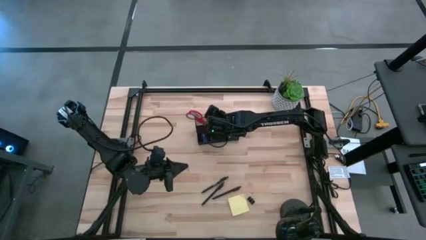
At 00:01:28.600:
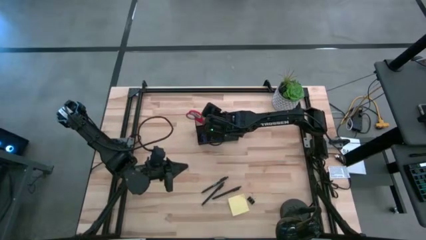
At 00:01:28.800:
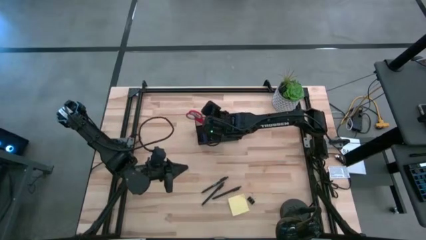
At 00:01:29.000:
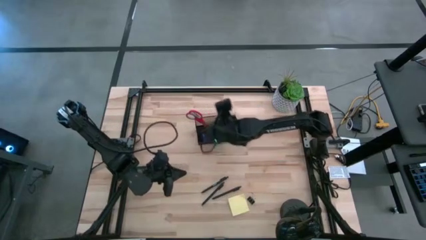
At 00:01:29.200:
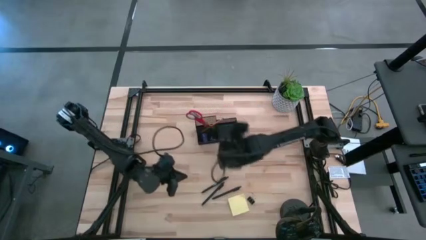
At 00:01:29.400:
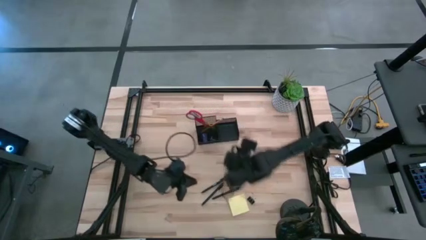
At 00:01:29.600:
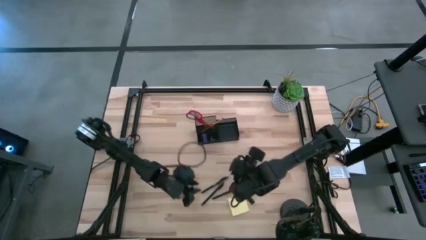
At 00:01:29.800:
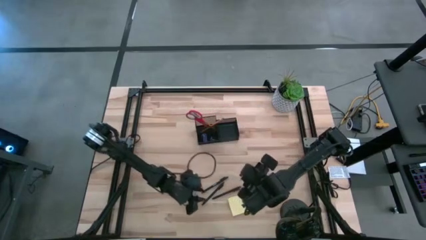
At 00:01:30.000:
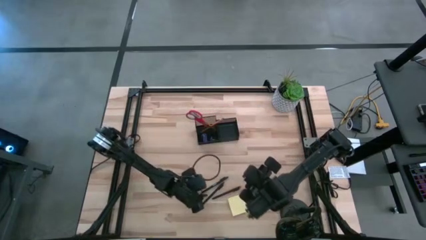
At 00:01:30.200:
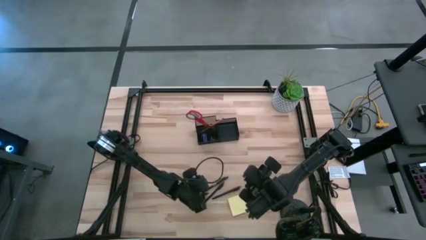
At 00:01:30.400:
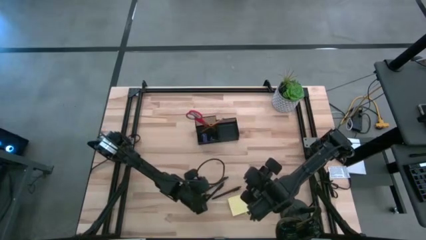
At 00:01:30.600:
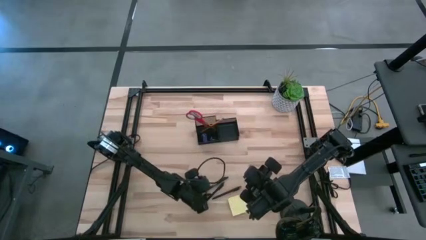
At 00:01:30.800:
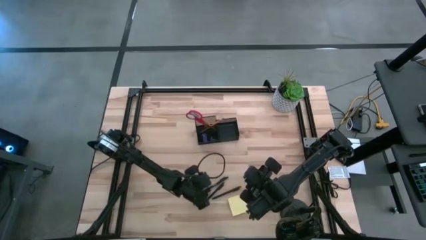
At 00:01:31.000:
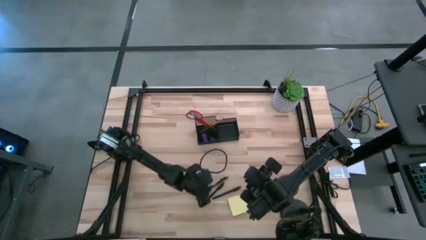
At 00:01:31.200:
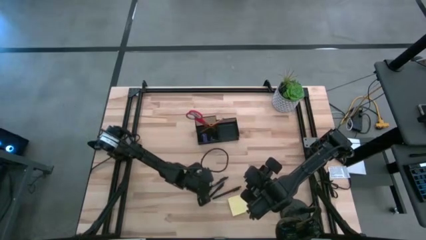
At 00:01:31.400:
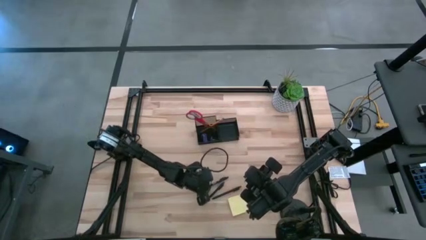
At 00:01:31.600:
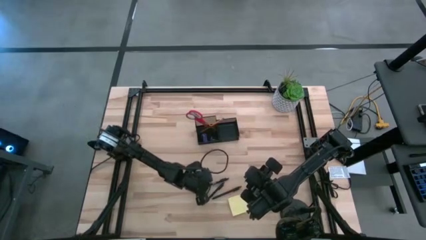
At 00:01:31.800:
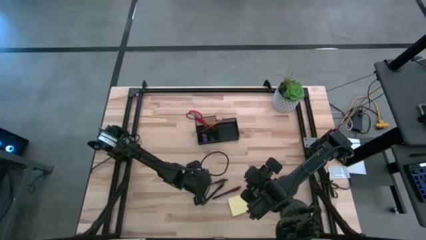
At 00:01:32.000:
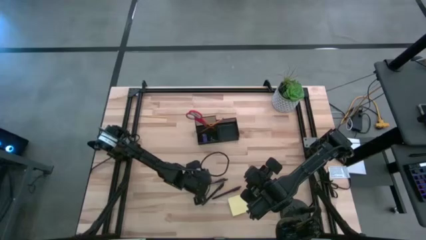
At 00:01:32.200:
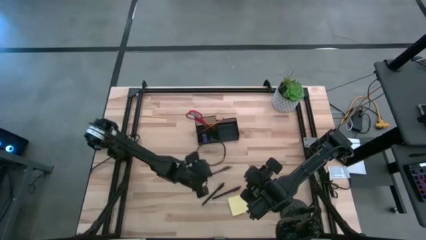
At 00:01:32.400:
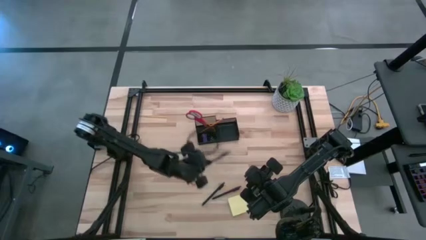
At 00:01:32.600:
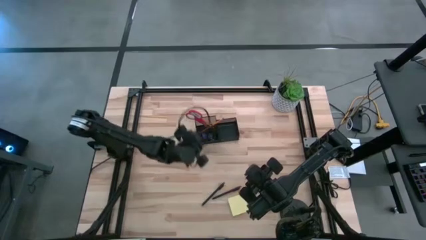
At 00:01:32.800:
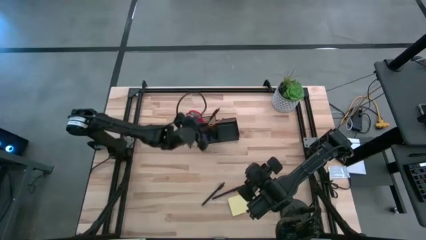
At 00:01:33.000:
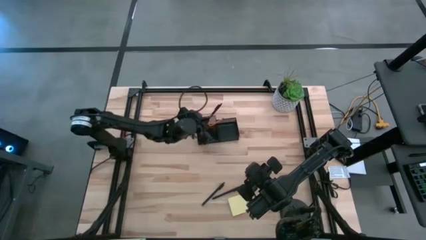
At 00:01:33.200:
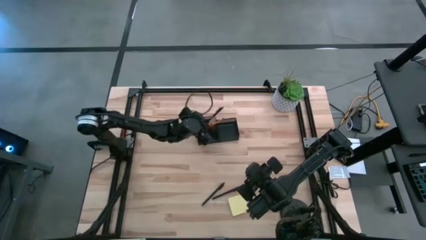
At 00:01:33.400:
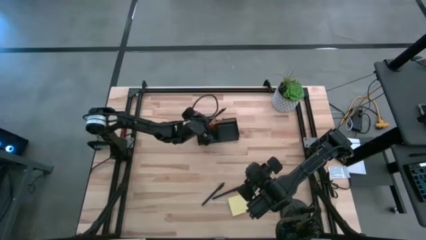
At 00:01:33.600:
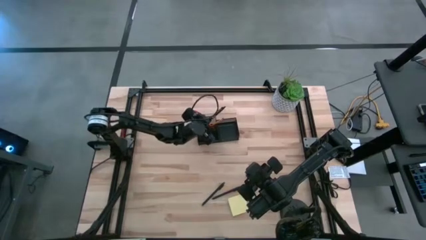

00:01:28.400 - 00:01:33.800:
Task: Pick and place office supplies into organizer
Put the top pen into the top left section of the desk organizer

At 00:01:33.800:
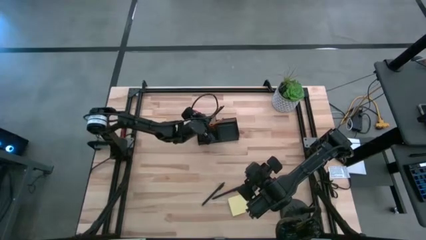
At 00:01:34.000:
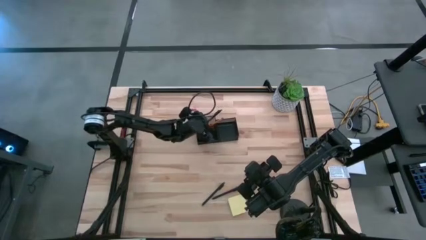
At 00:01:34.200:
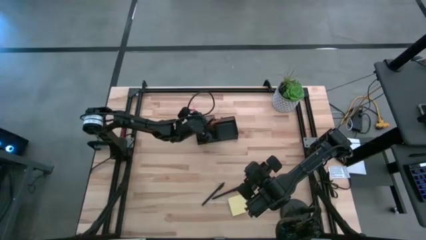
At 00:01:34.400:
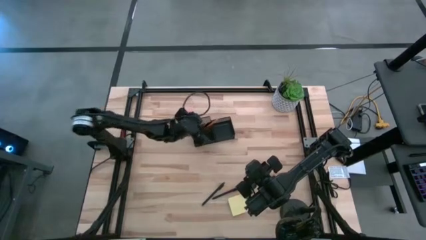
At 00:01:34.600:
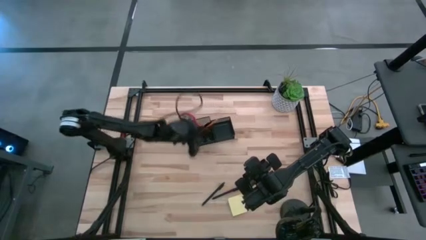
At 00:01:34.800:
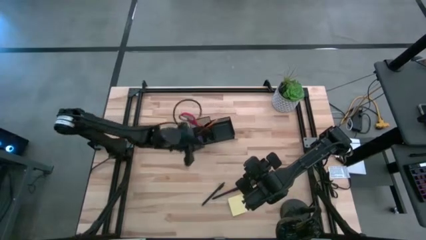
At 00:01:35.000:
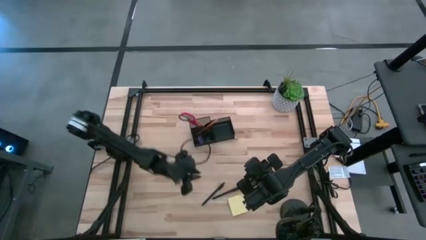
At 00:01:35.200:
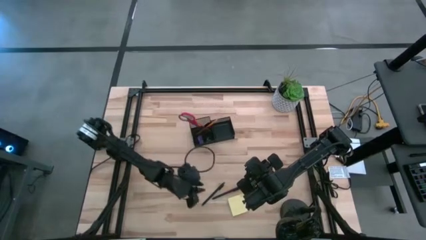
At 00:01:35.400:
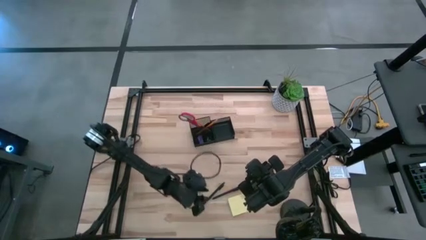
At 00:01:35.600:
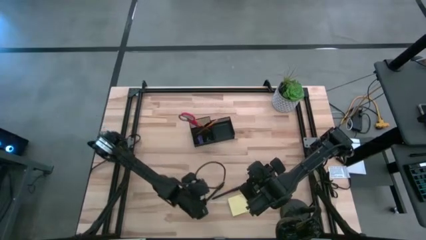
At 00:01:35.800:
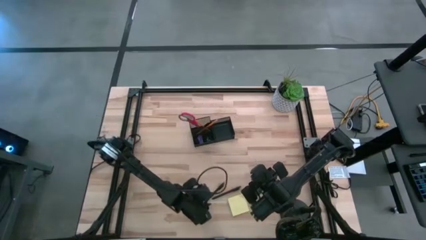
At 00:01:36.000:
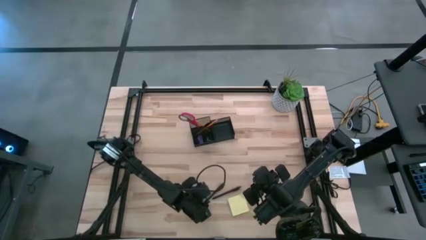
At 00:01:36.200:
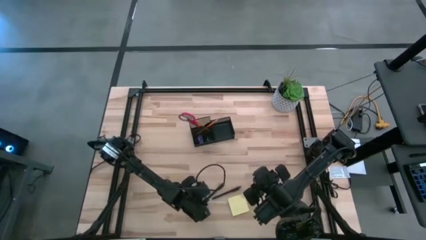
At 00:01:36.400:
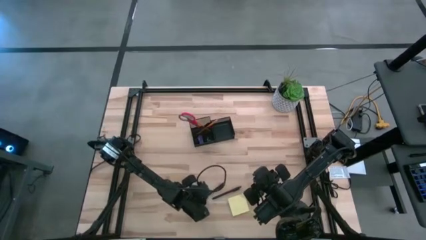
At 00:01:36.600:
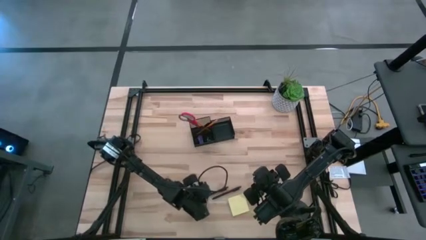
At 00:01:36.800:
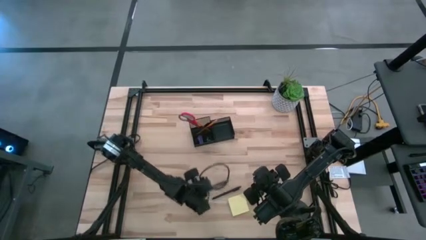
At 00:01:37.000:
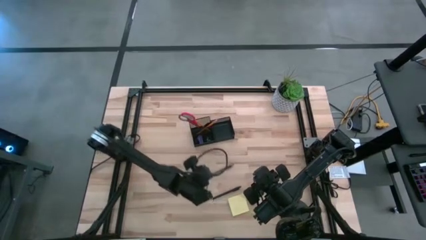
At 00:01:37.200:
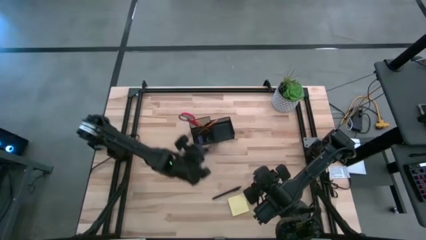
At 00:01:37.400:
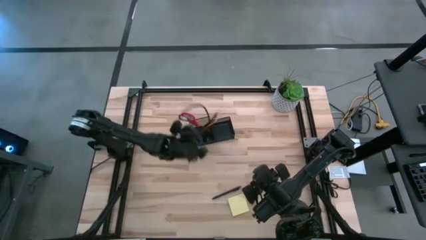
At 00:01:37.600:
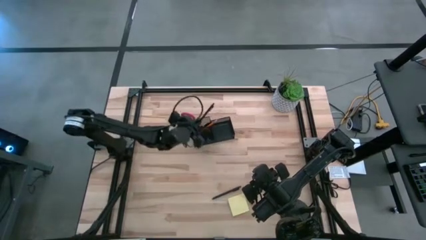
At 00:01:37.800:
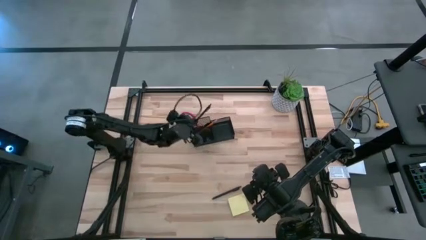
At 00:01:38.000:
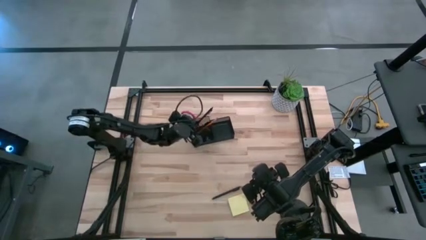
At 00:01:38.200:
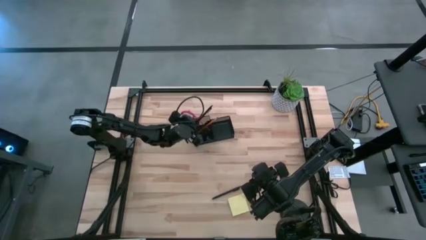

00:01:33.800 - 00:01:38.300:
Put the top pen into the top left section of the desk organizer

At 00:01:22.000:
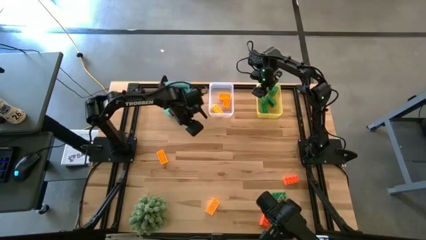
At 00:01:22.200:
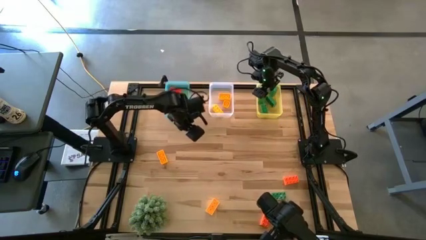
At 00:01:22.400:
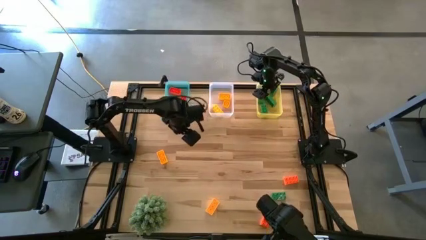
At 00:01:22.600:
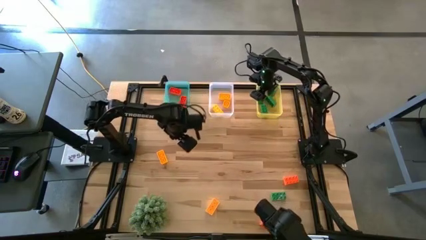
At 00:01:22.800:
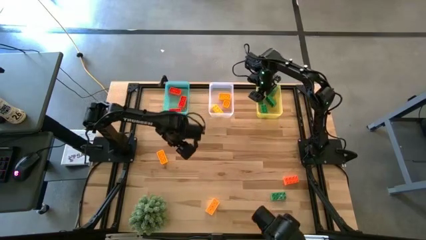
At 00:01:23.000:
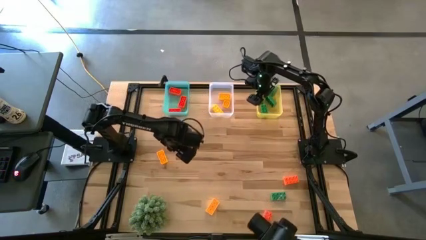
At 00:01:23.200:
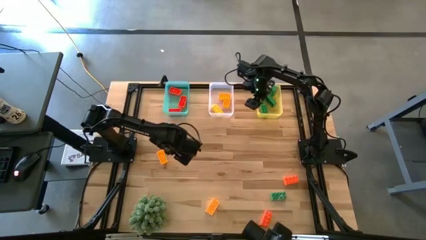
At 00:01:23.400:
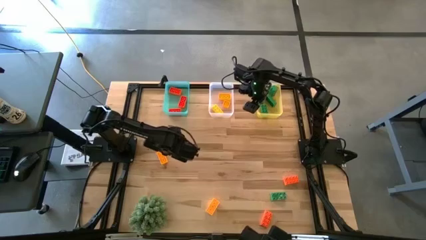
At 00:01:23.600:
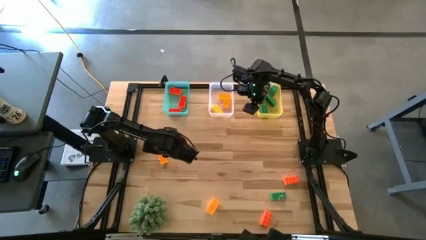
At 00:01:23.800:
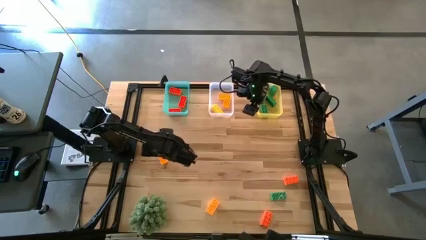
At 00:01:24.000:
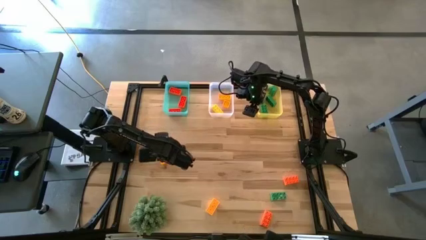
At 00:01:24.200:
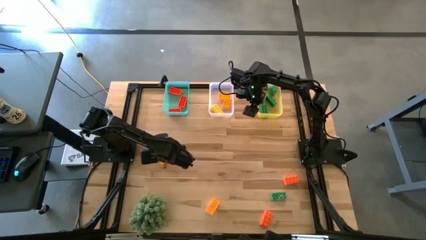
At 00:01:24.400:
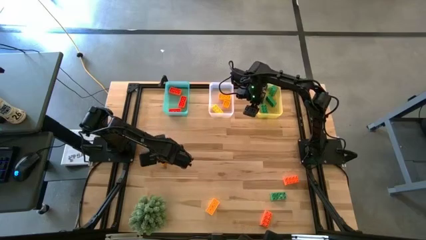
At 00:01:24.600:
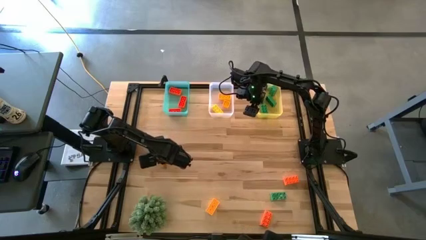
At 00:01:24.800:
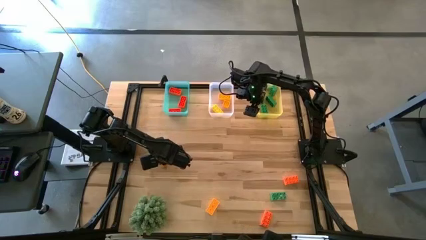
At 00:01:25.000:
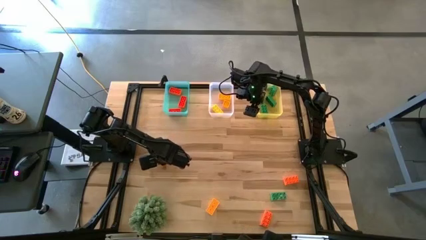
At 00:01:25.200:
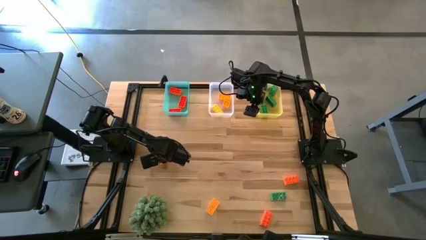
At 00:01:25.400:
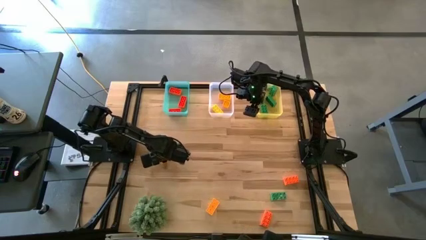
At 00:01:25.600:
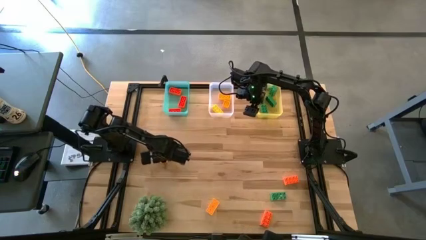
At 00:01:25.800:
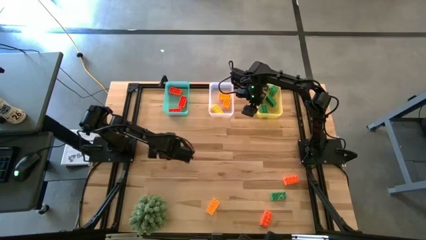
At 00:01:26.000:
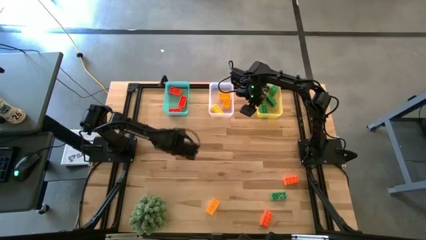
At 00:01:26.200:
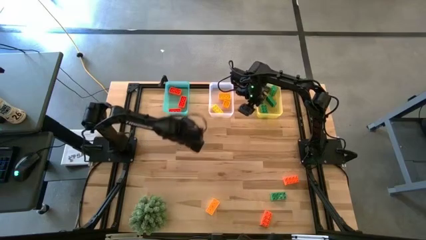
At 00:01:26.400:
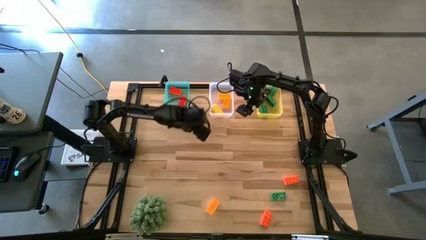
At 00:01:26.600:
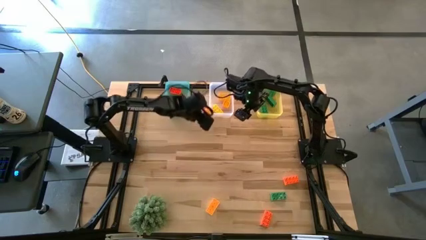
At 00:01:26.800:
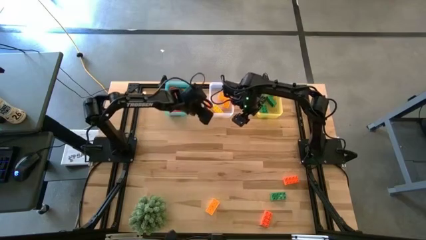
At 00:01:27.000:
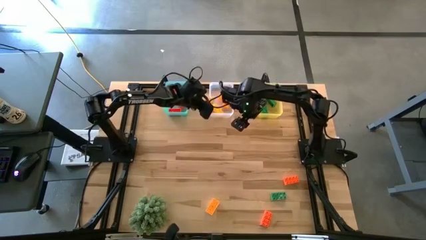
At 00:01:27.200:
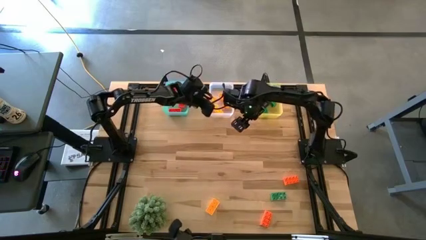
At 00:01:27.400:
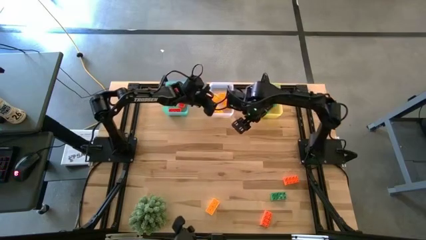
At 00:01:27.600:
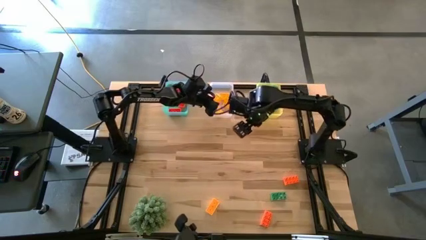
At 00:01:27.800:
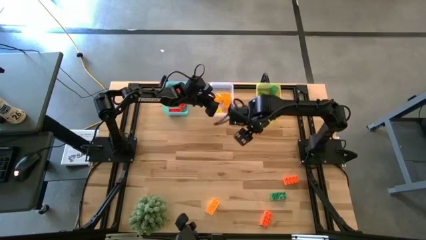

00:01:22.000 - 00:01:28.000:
Task: Sort & place blocks by color
Put the yellow game piece into the white bin

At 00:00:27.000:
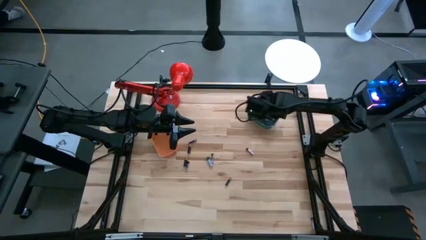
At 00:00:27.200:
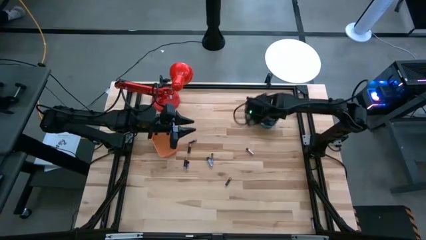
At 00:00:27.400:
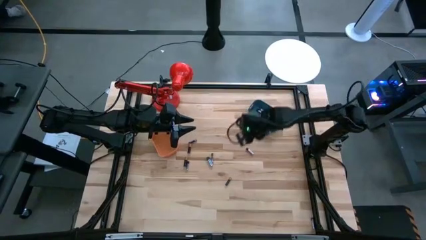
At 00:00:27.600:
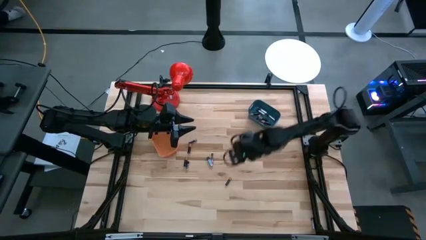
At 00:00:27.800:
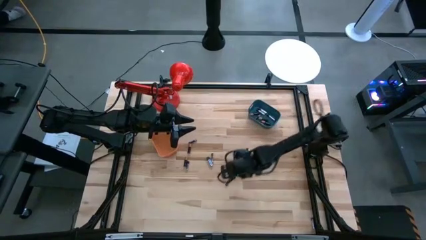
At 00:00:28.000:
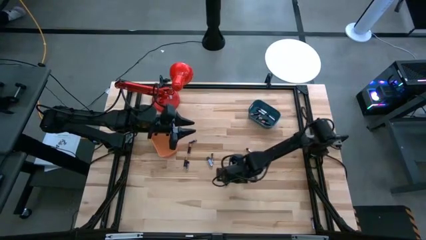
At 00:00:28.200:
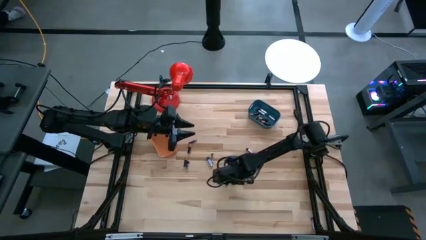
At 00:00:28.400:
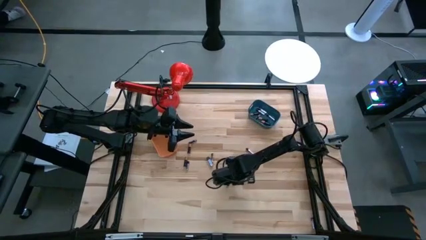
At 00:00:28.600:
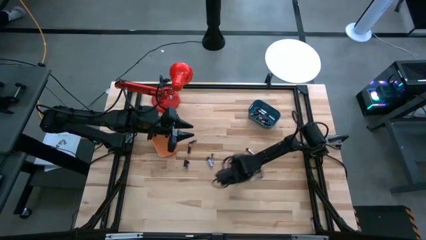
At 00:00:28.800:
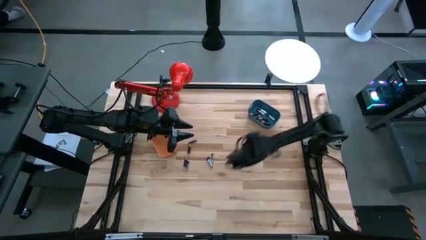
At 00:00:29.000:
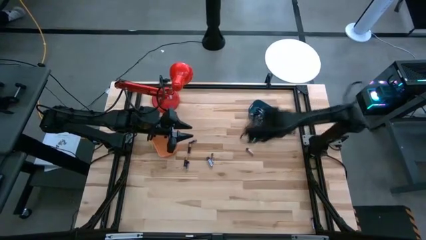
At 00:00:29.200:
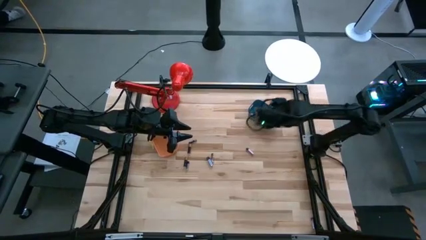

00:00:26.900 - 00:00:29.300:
Task: Sort batteries
Put the black battery into the blue bin
